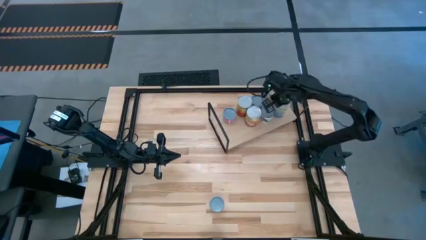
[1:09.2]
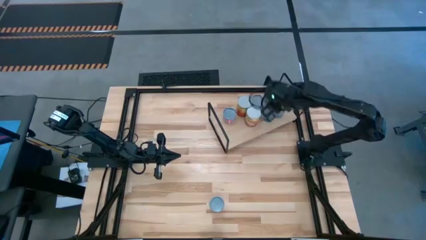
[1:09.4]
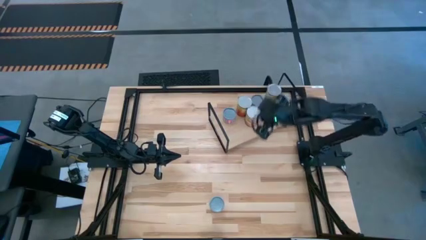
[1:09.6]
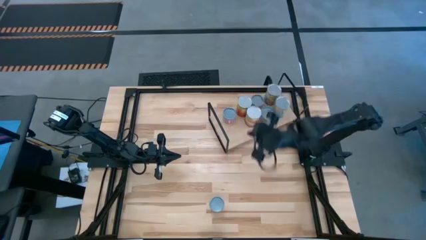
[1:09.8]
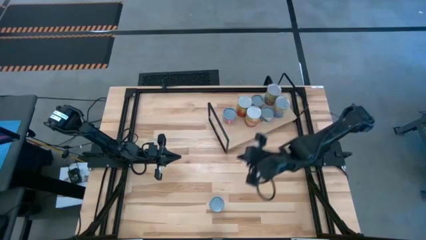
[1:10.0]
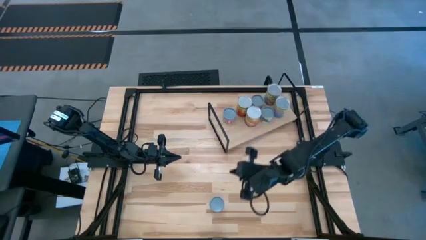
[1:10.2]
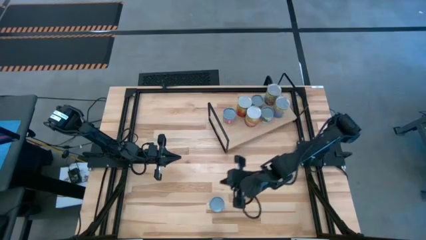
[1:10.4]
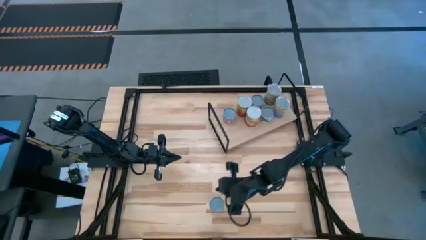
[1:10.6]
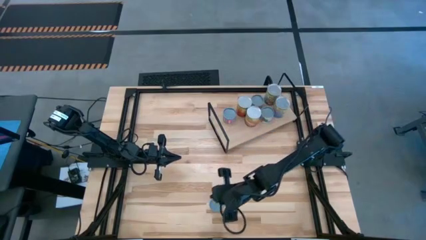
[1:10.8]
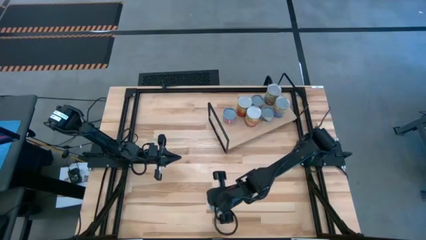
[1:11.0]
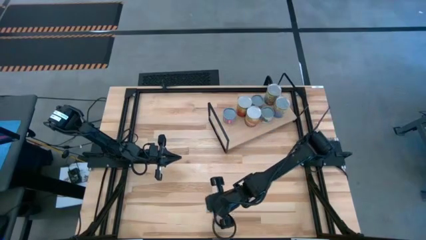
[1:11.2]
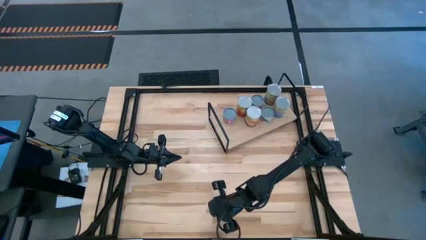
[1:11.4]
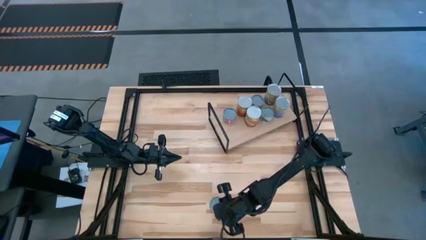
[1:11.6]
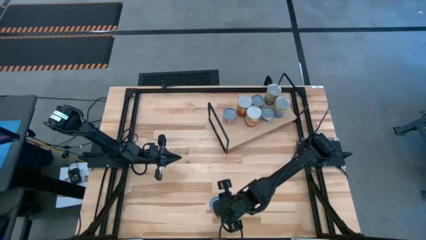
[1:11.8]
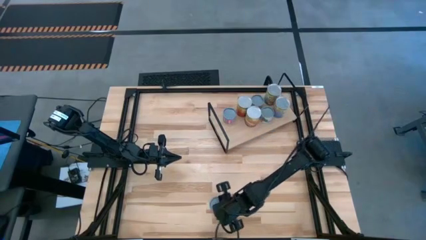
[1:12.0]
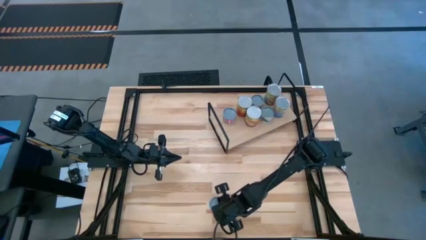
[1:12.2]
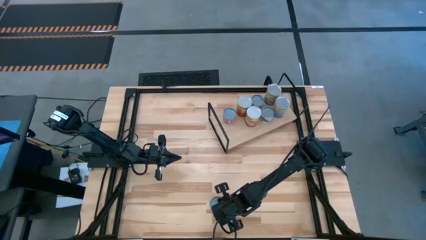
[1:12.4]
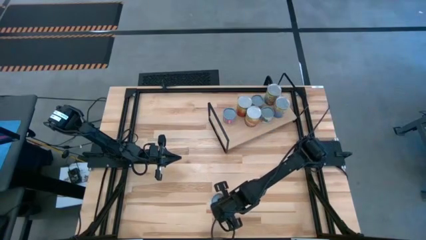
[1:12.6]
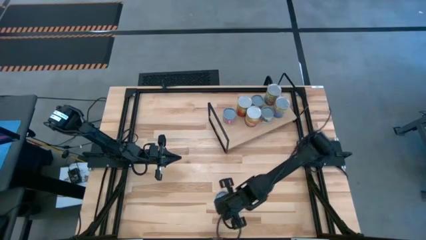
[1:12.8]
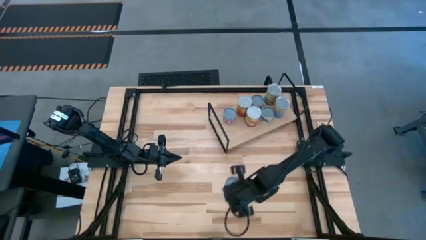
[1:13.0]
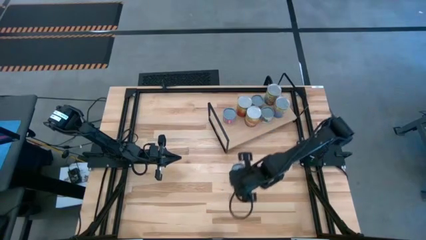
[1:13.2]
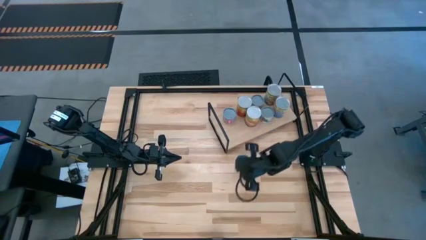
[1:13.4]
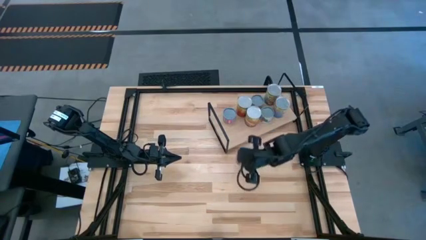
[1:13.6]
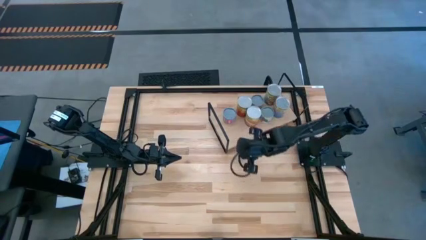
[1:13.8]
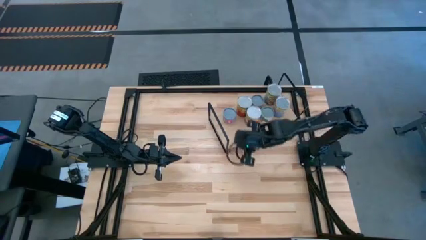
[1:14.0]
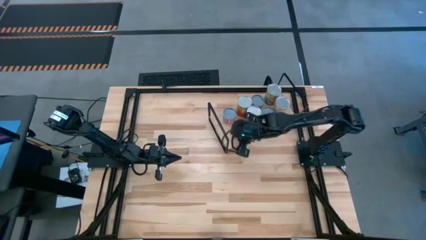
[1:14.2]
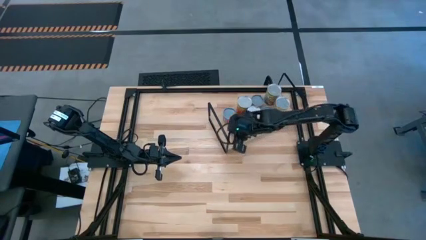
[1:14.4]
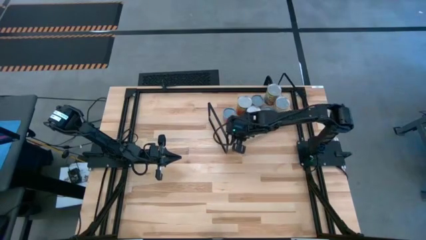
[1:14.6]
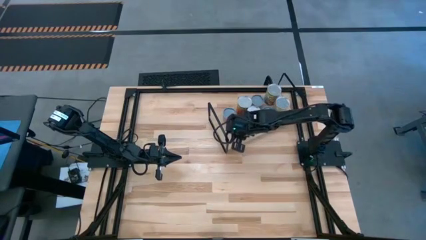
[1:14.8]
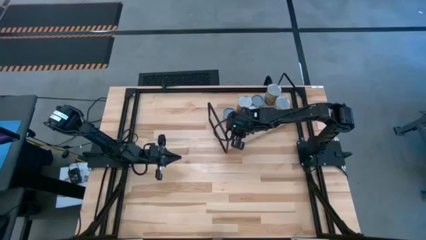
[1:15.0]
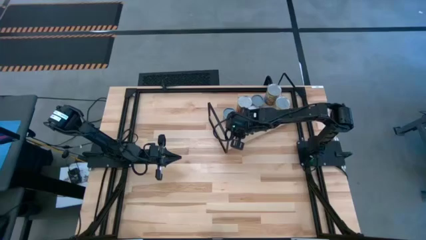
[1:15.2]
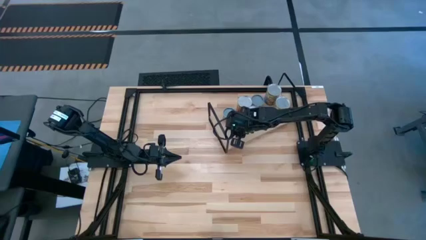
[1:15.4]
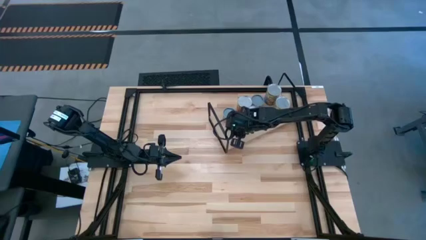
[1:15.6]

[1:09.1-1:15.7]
Task: Pick and place cans onto a shelf
Put the canned orange on the shelf

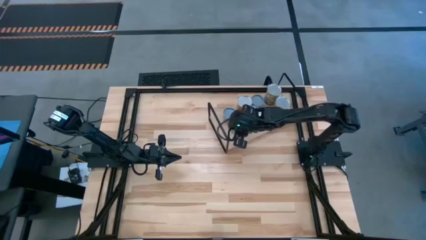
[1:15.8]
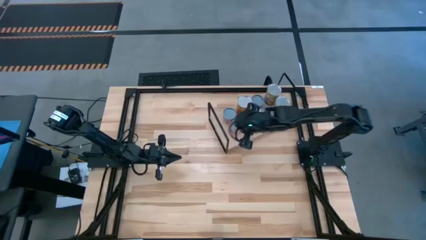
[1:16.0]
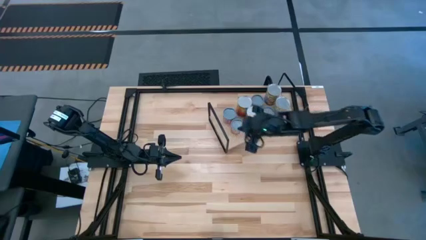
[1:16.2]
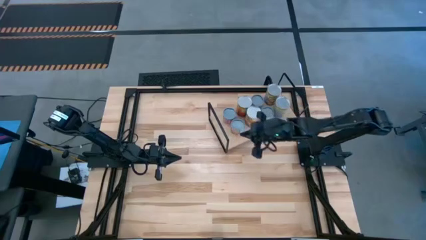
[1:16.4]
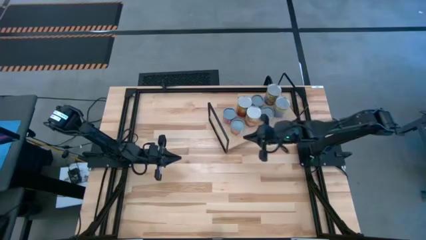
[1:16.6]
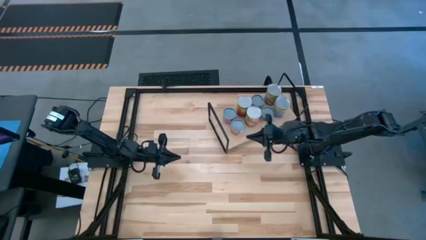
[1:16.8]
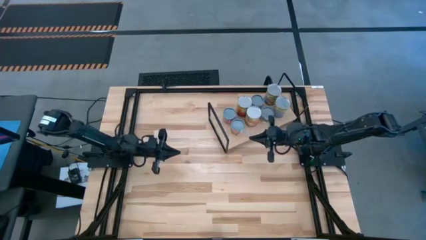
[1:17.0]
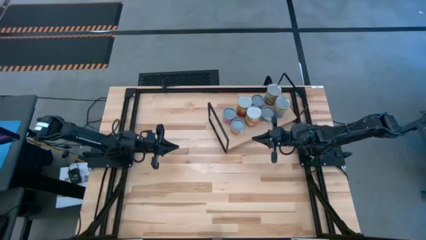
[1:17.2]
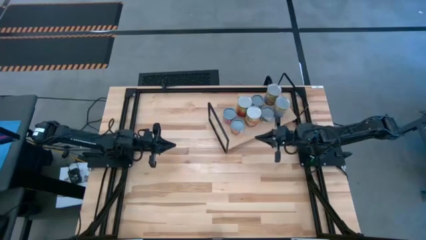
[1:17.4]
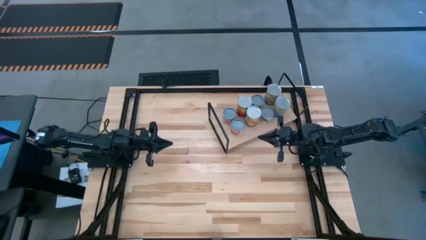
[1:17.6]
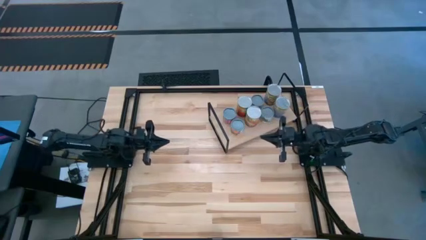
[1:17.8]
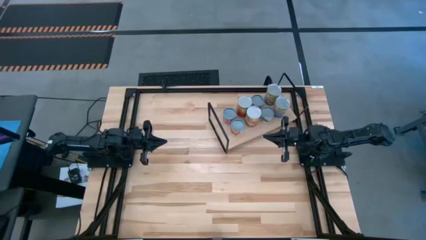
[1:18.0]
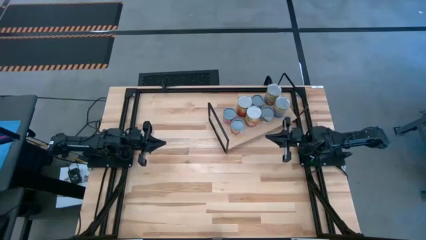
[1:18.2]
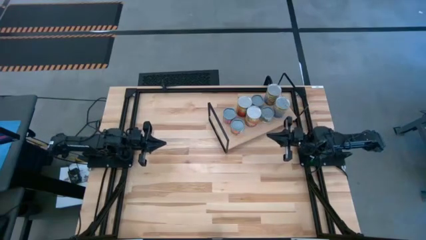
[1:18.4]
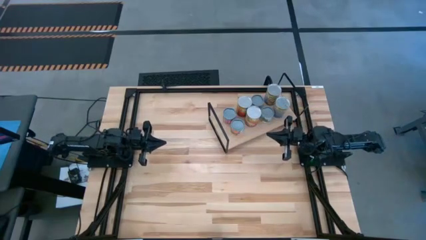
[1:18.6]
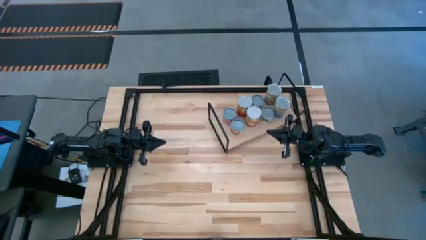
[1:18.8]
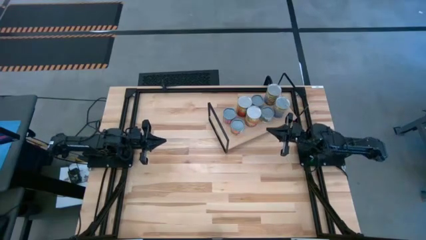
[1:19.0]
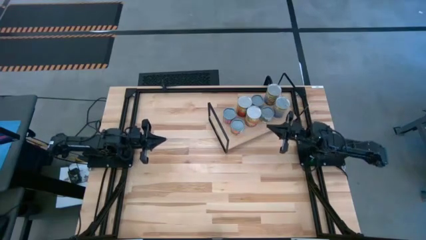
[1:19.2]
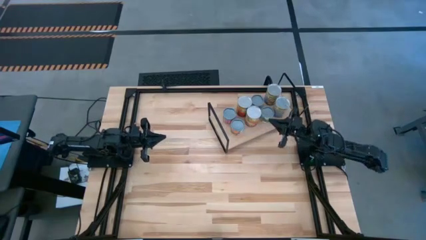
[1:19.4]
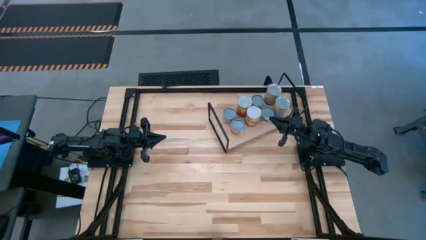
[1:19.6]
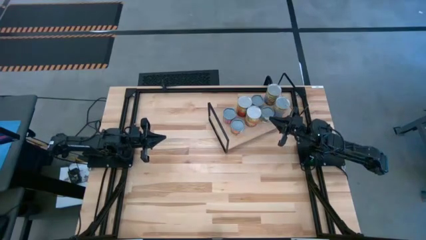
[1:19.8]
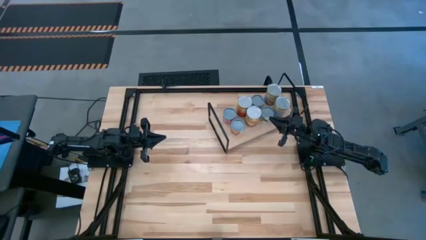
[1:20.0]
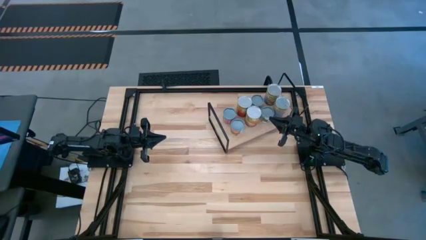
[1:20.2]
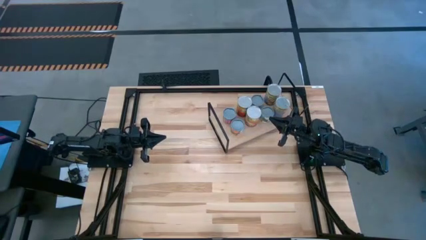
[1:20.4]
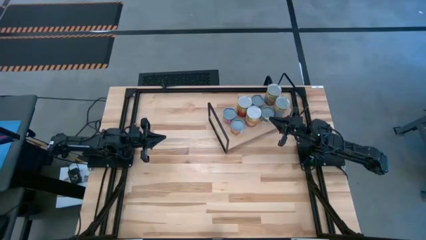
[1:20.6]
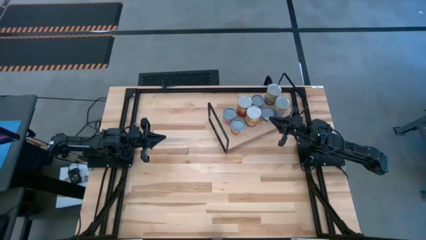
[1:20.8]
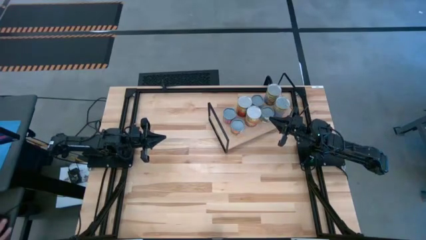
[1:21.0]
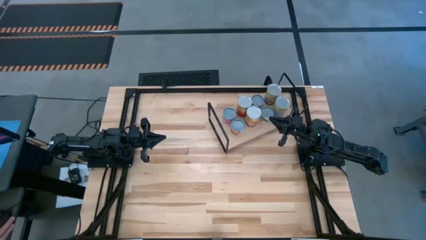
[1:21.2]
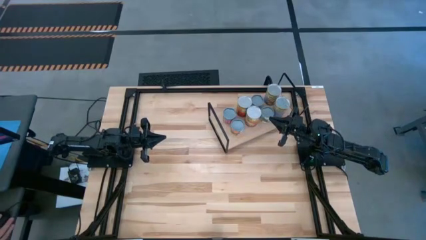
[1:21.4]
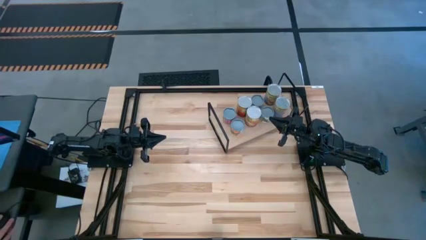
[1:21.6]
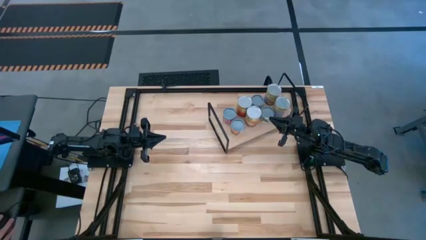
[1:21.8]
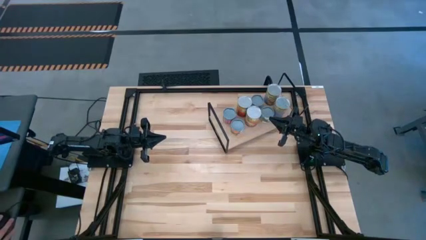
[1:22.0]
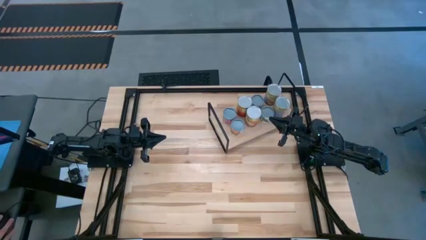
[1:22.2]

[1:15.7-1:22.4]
Return to Home Position

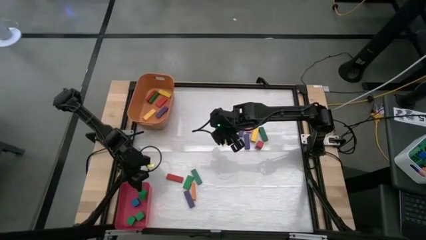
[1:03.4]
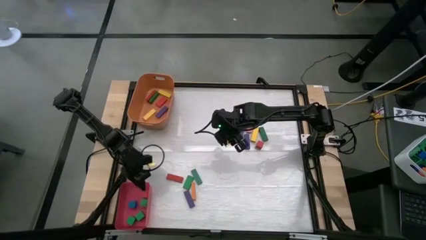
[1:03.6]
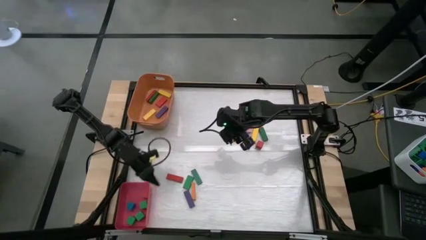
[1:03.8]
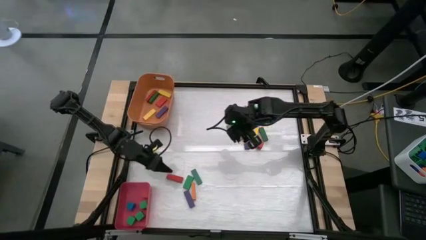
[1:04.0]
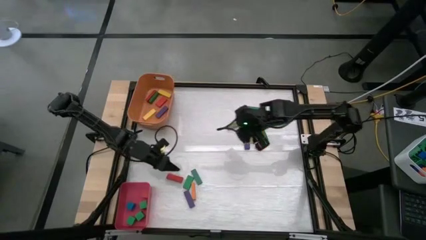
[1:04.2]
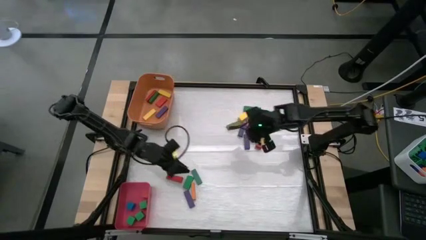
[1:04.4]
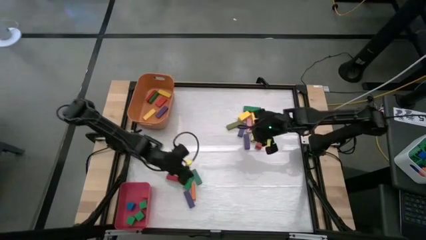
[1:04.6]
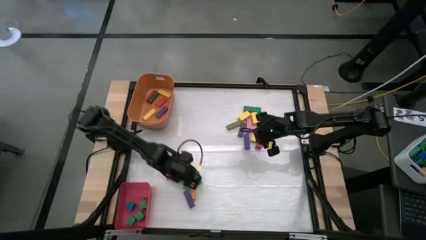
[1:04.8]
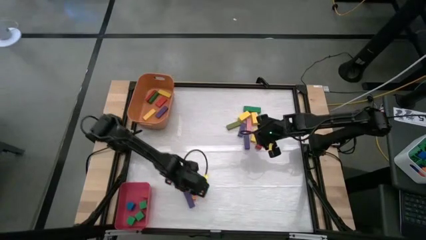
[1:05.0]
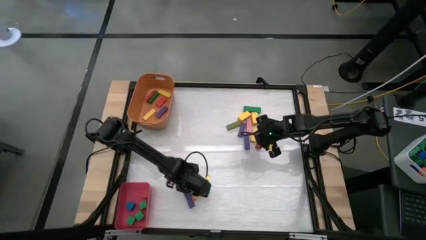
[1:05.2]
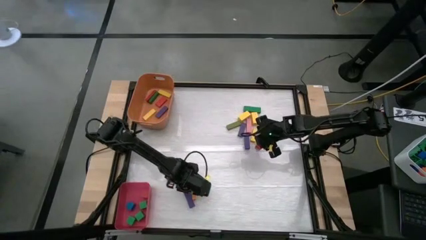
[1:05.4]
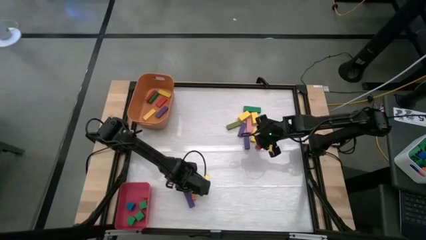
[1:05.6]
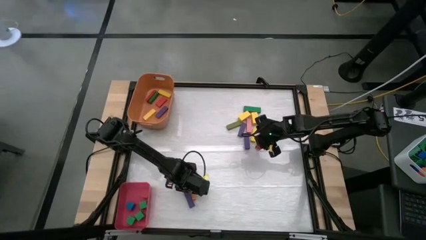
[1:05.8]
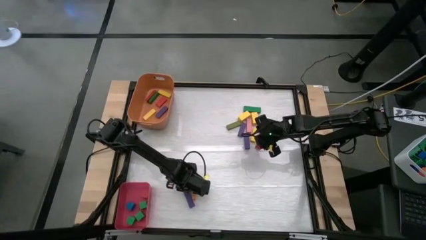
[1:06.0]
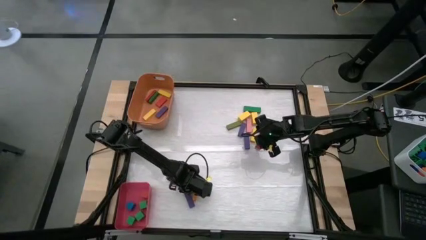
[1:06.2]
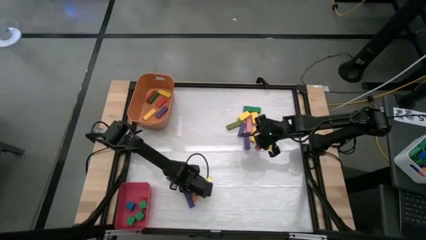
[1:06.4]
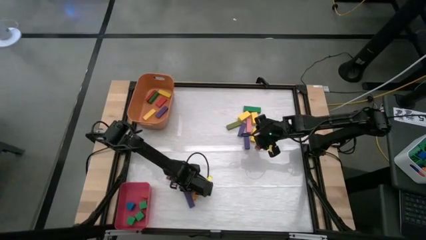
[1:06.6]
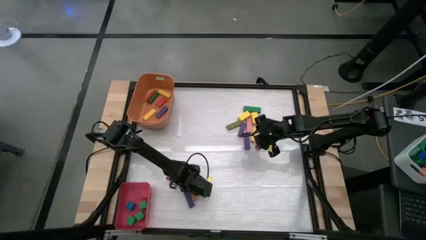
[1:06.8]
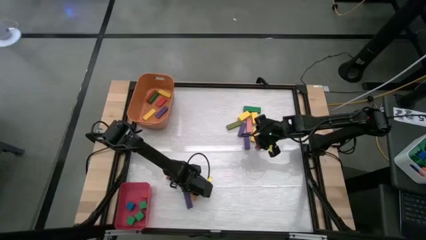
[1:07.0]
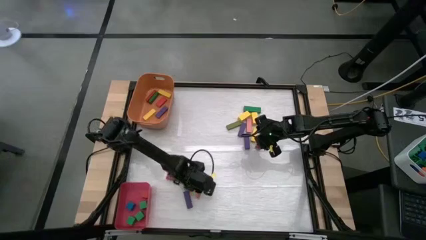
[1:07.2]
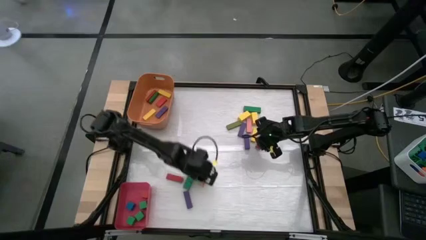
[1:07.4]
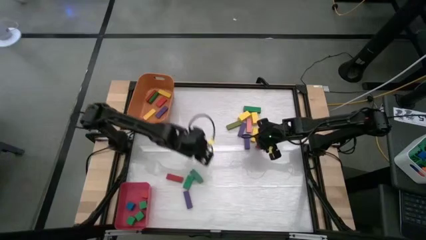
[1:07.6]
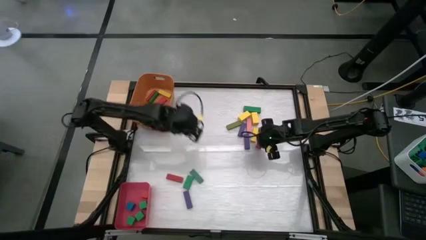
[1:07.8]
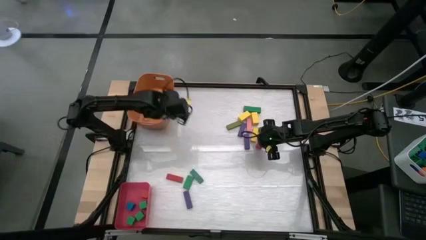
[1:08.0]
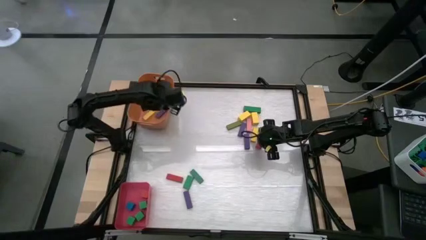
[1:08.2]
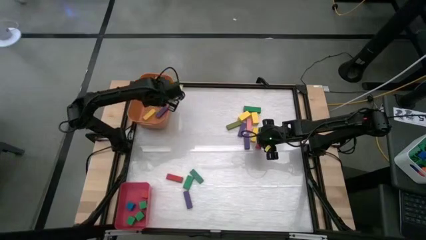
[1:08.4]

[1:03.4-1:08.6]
Task: Sort blocks by size
Put the big orange block into the orange bin
